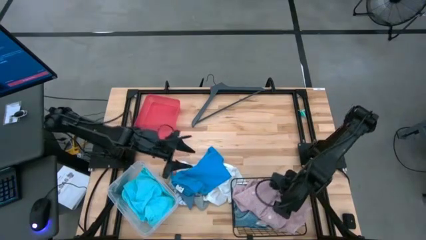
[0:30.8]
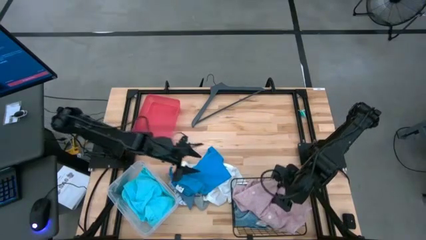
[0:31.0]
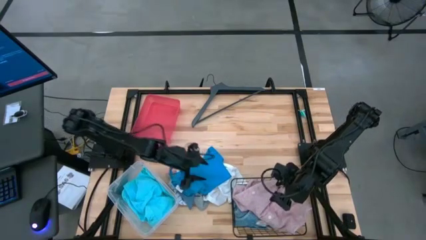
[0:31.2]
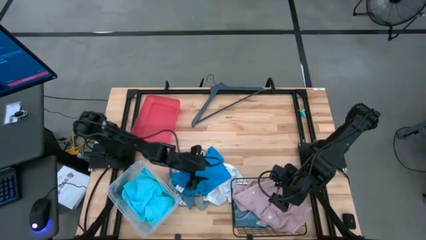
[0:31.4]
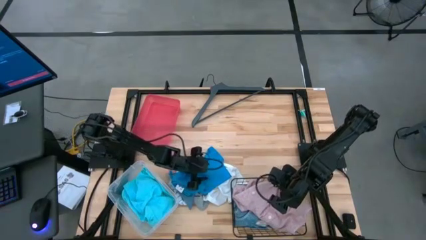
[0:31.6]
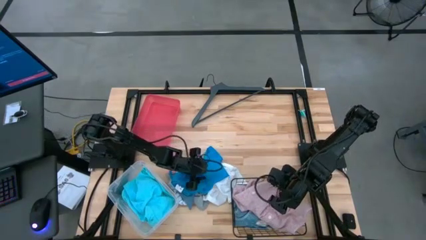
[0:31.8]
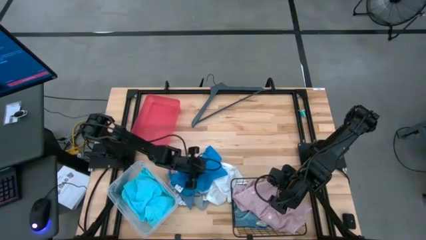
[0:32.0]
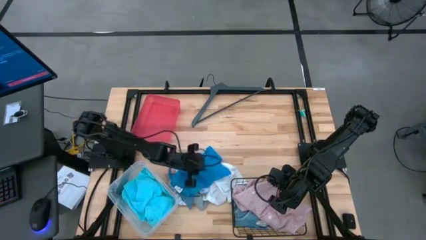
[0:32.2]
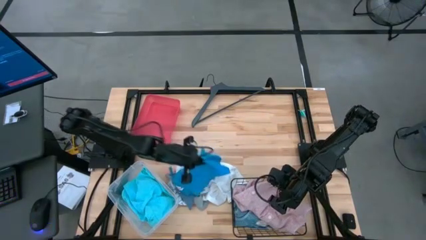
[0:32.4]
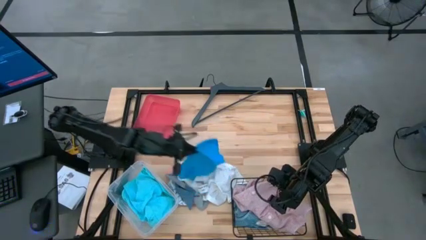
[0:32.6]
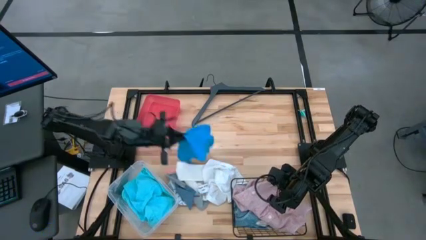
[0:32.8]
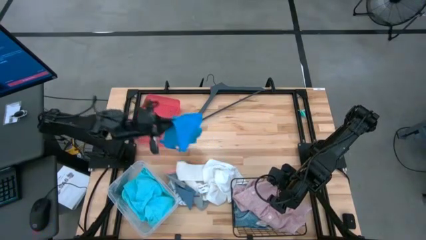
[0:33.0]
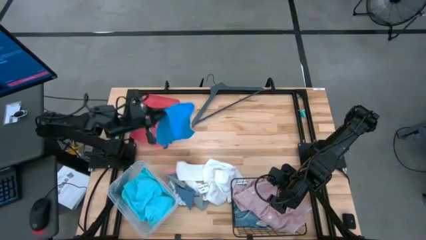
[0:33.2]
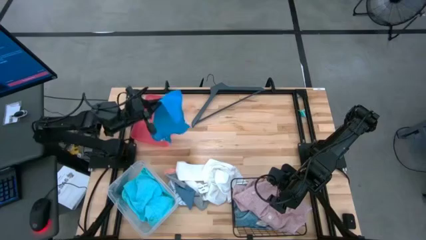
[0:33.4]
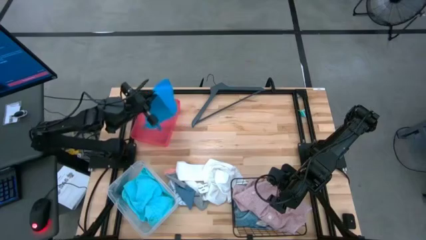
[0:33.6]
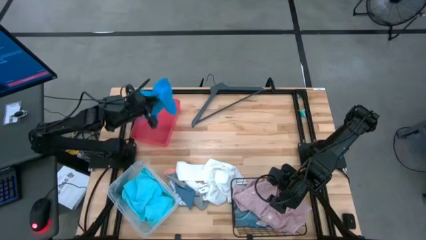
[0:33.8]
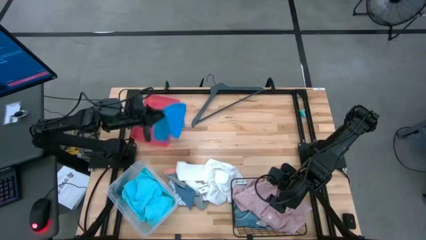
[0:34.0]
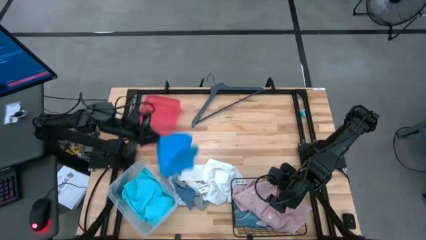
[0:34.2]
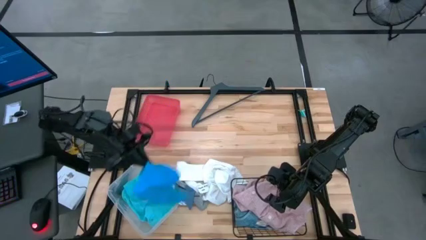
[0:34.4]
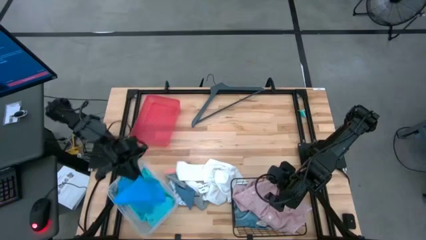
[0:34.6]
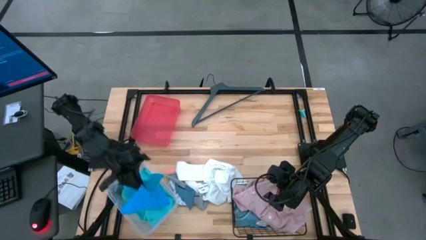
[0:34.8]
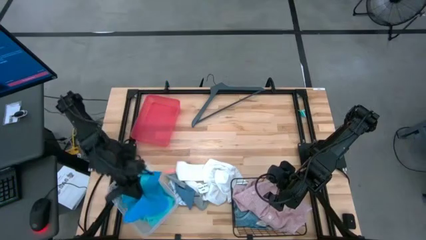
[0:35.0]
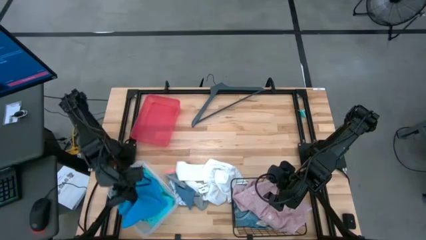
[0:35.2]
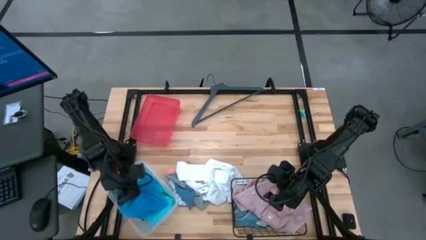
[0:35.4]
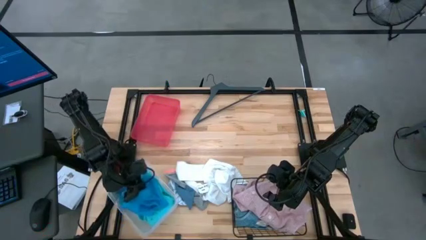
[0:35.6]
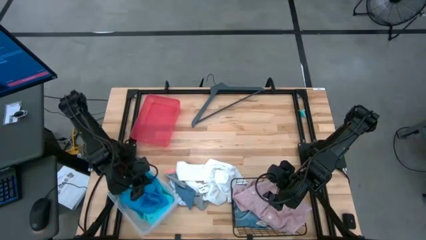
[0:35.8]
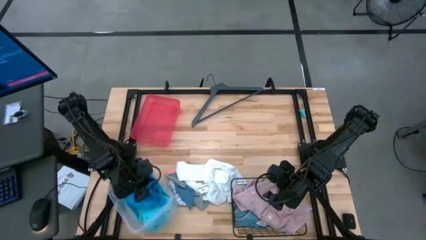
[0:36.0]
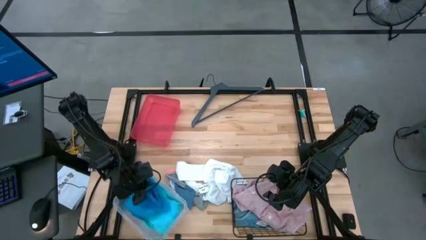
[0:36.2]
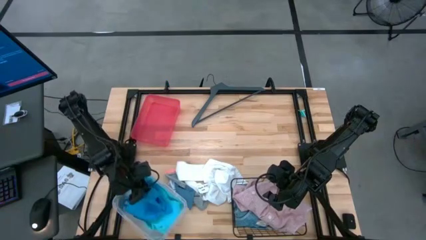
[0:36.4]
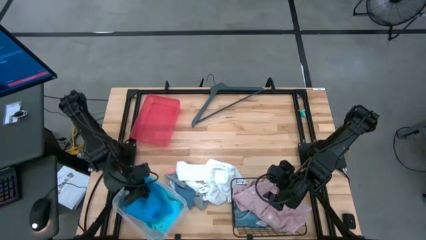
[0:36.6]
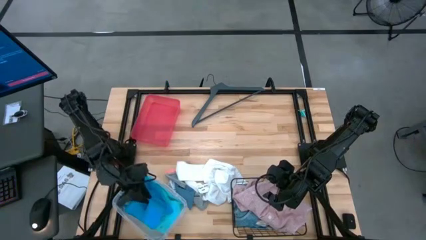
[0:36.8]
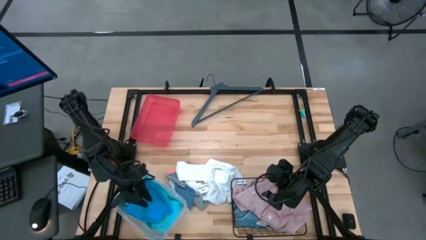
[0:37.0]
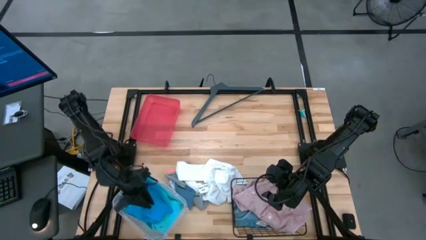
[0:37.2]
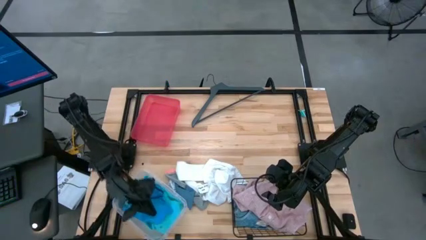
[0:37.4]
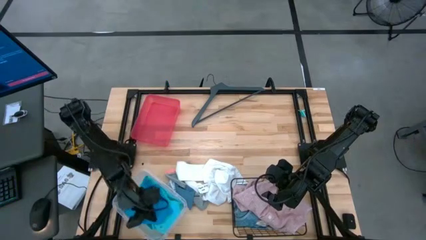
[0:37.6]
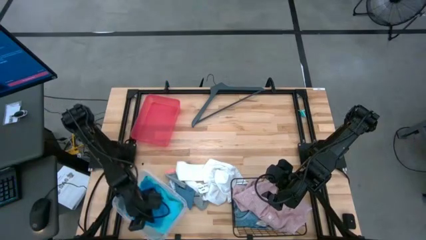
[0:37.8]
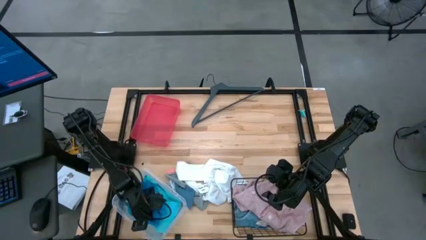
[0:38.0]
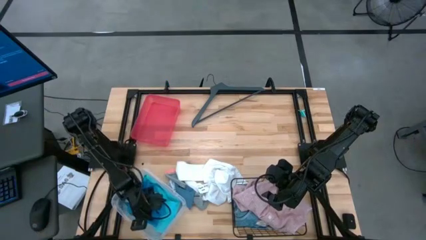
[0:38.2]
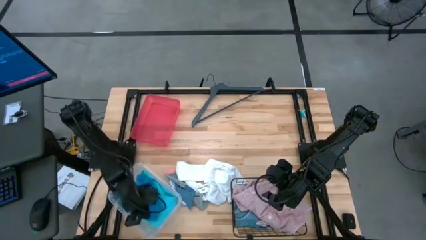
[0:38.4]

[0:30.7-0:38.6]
Task: Pick & Place Cloths
Put the blue shorts into the transparent bin

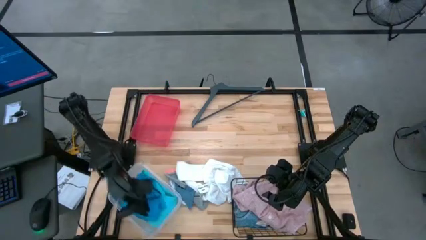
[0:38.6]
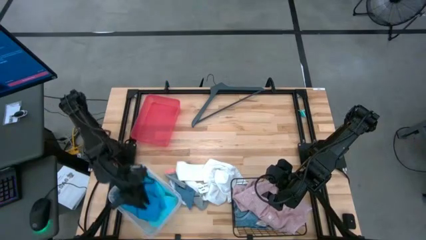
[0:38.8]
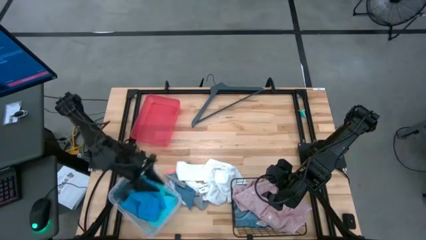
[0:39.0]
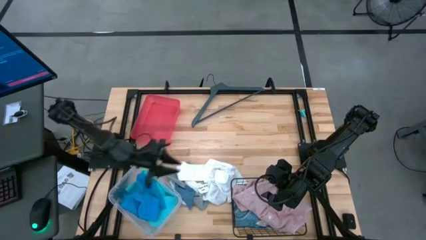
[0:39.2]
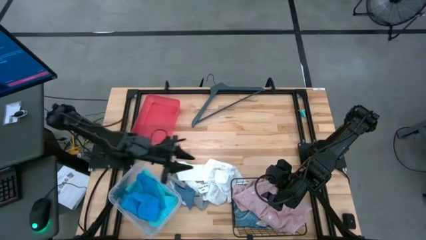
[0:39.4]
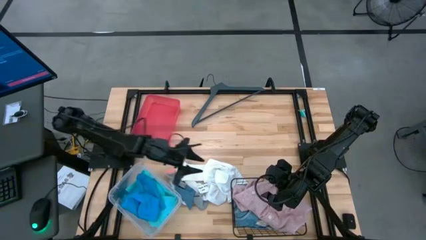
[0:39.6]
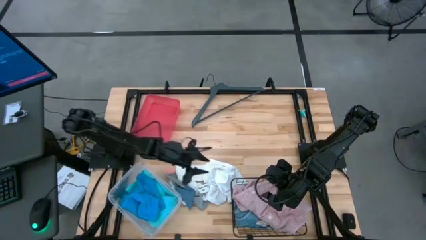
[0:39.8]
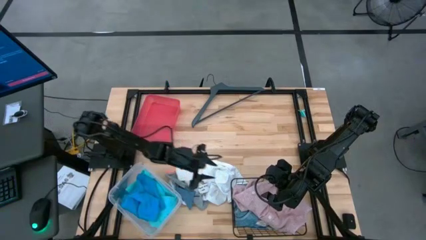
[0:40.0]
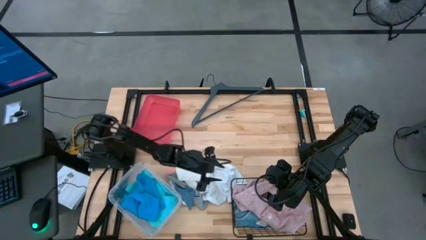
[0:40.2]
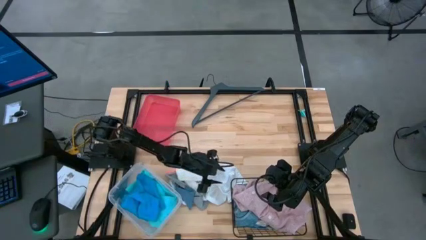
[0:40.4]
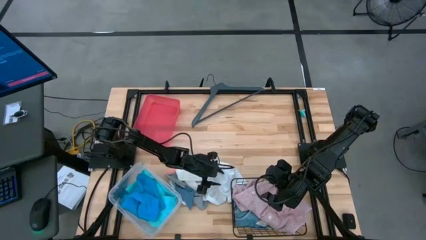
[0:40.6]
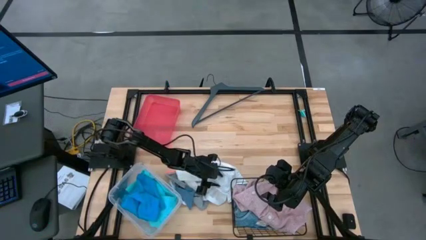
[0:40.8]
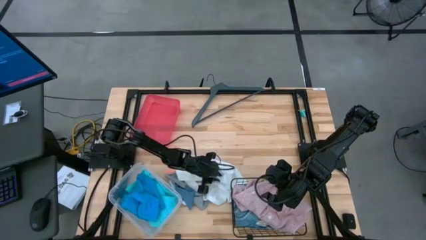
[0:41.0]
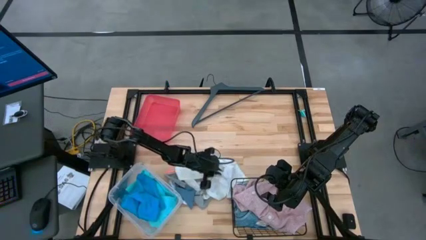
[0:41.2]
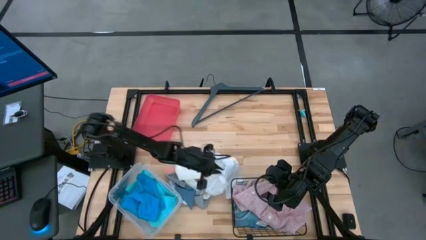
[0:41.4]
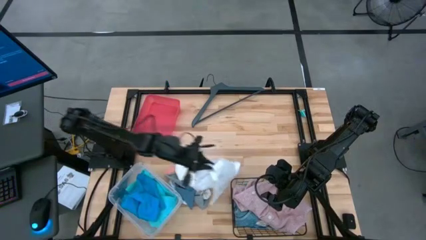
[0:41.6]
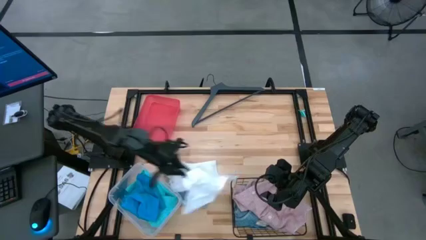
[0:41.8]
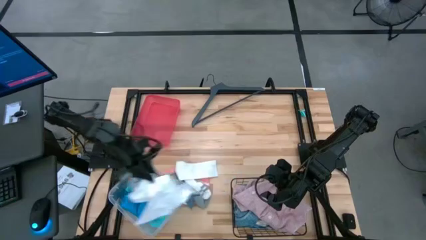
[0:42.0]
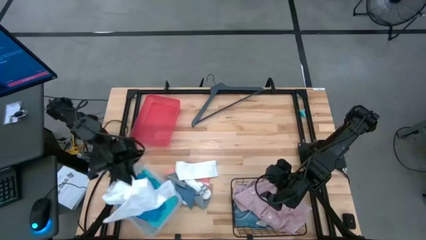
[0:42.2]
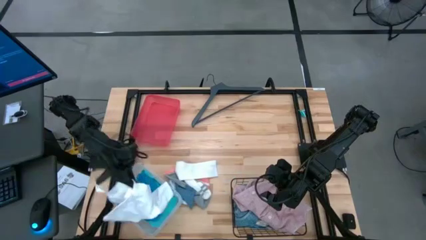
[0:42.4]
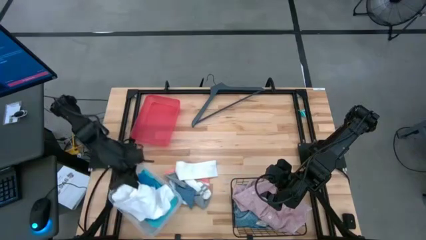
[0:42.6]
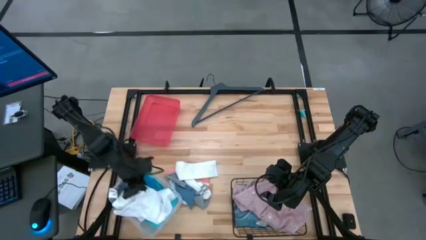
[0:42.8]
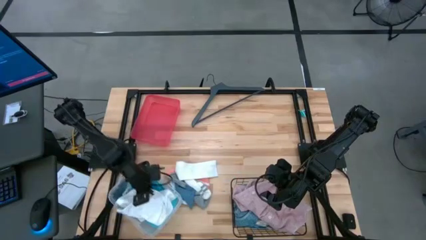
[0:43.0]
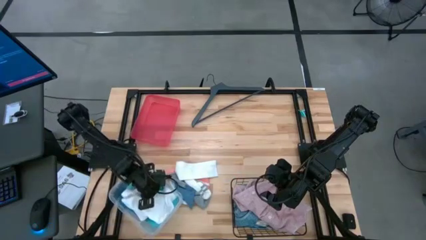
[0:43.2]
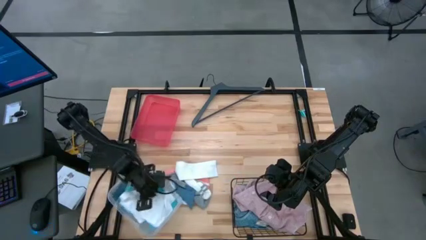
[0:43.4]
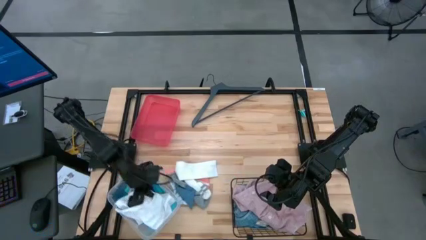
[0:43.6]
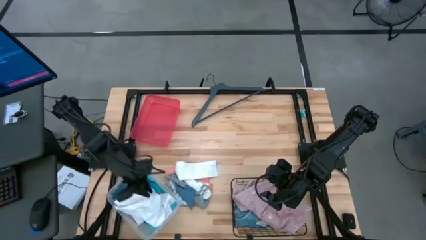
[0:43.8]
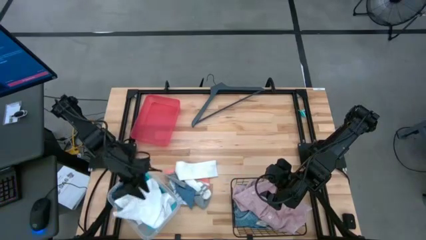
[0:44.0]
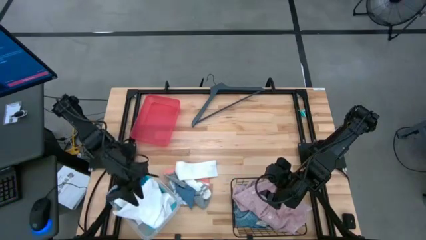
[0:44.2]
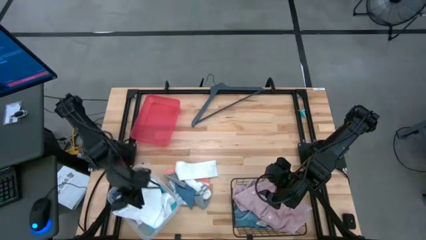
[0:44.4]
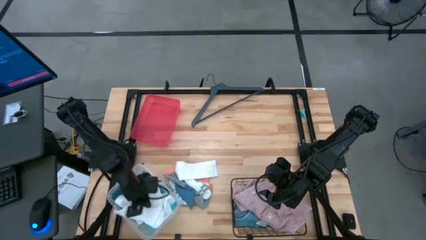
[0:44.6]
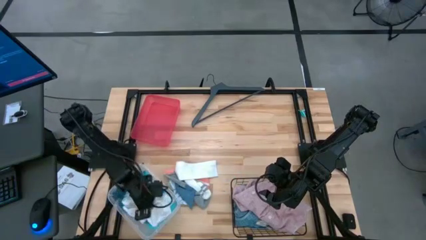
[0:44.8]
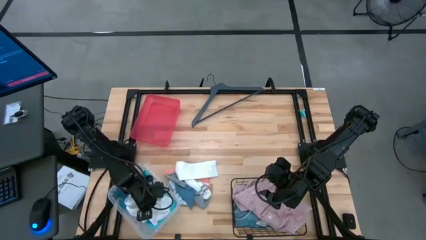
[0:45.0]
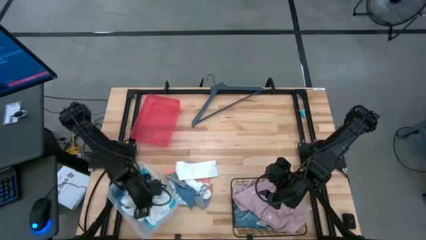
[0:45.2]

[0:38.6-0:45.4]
Put the white shorts into the transparent bin

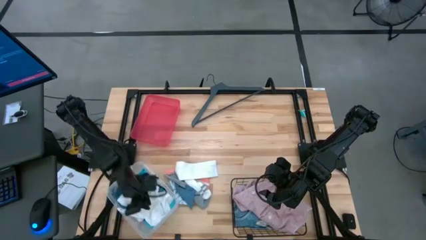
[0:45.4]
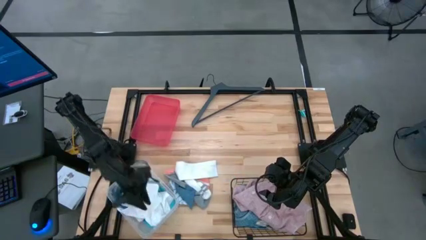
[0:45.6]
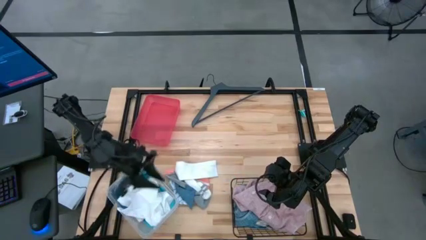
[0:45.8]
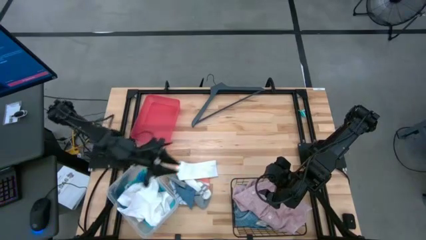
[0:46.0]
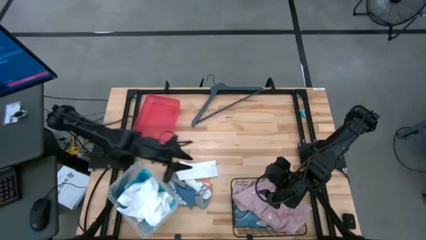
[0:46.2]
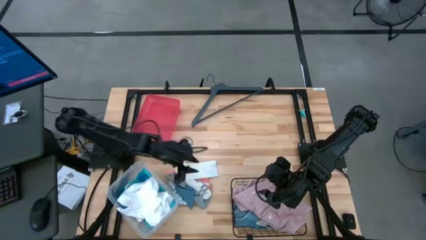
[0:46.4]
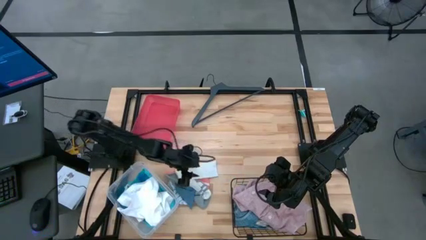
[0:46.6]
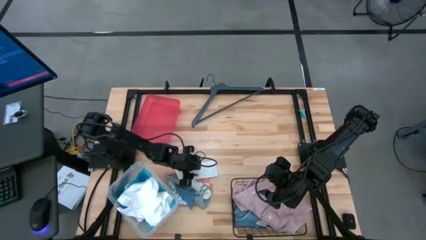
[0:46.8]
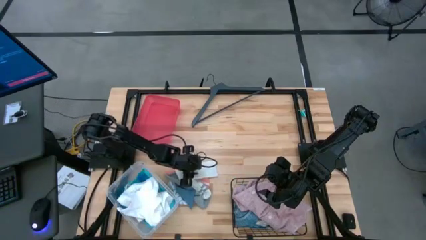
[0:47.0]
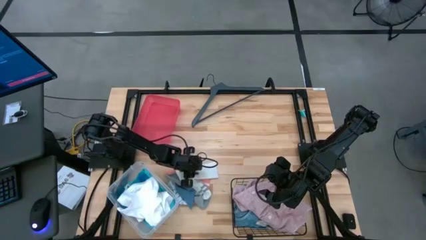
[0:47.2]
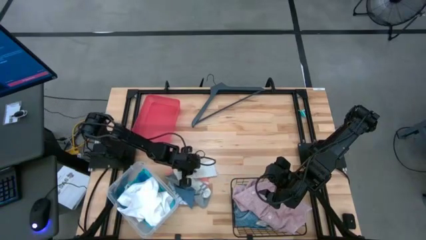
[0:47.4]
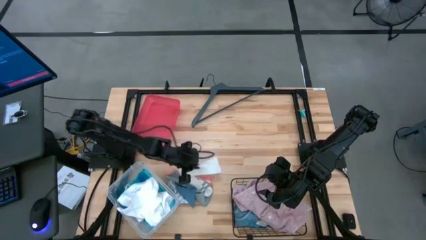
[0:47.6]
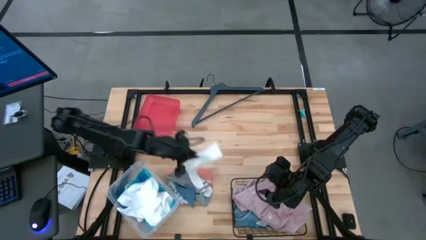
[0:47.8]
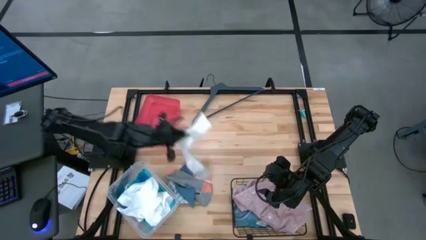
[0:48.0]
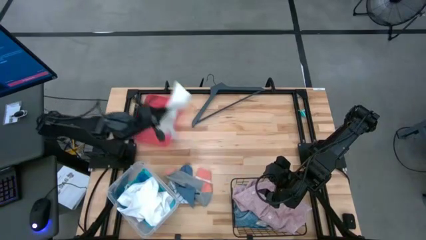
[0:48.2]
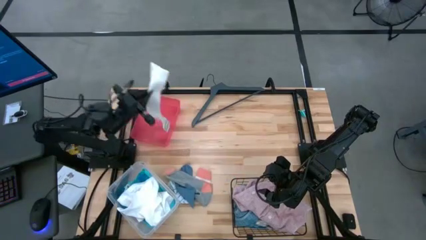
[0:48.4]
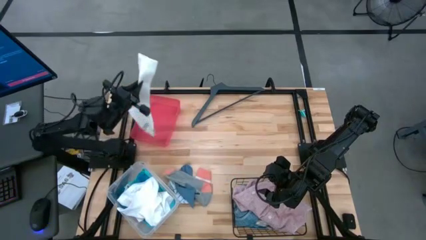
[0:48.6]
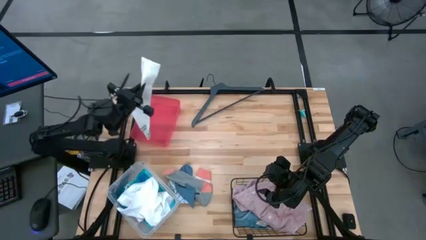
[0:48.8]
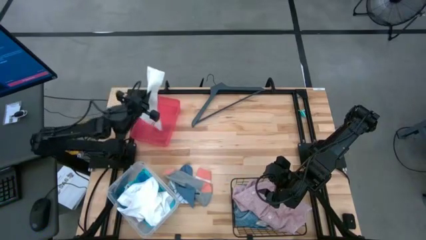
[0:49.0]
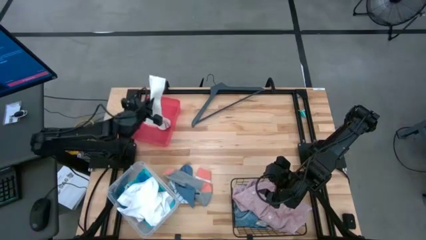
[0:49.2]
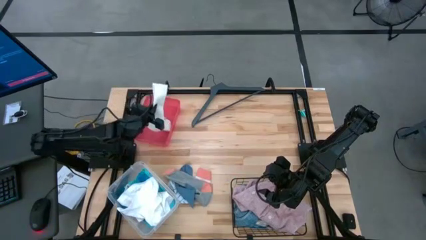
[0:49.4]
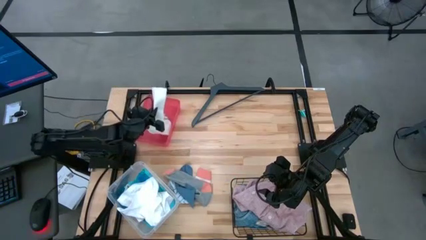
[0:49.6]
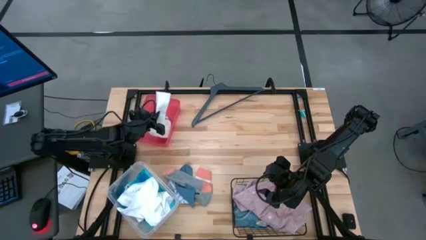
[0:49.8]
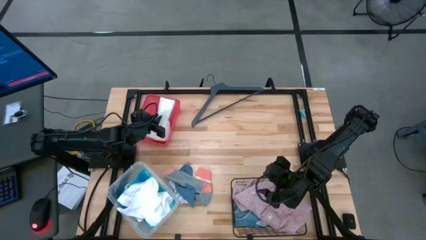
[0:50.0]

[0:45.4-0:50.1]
Put the white sock into the red bin
